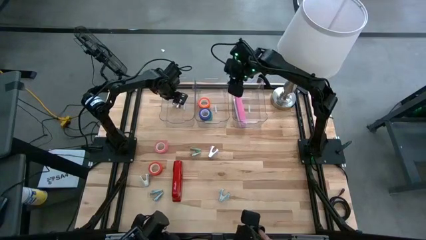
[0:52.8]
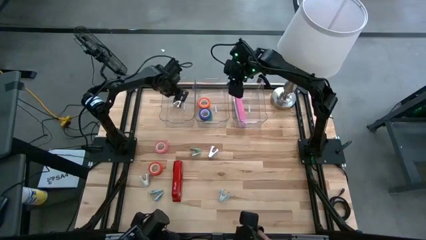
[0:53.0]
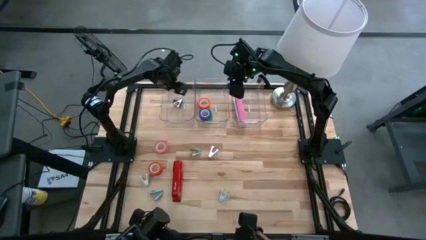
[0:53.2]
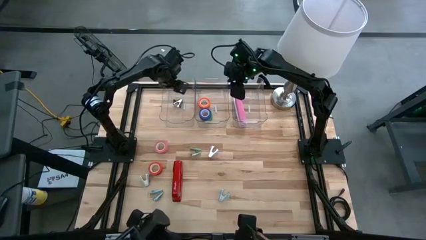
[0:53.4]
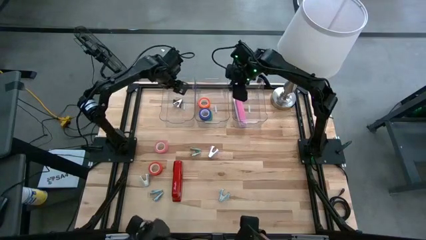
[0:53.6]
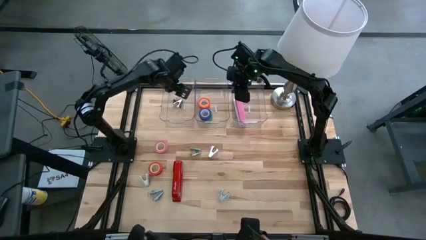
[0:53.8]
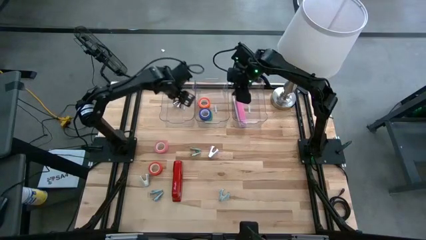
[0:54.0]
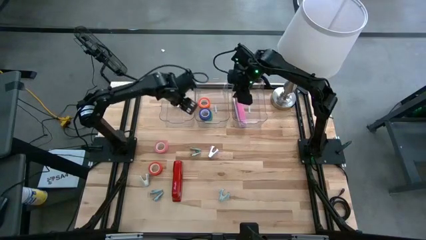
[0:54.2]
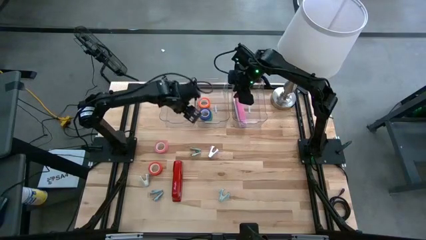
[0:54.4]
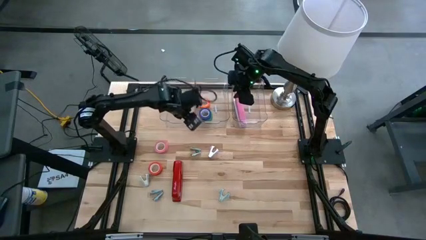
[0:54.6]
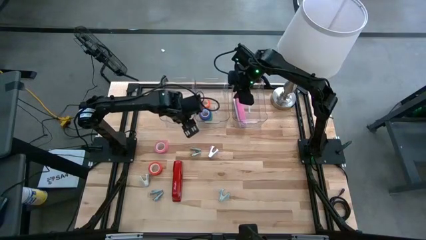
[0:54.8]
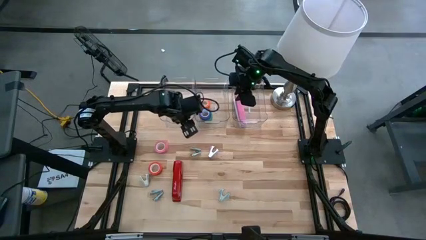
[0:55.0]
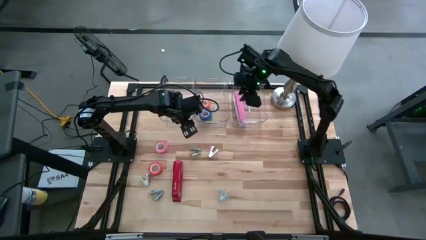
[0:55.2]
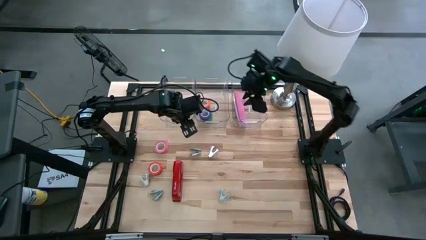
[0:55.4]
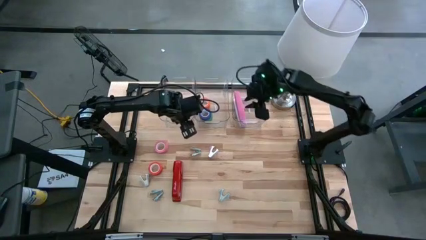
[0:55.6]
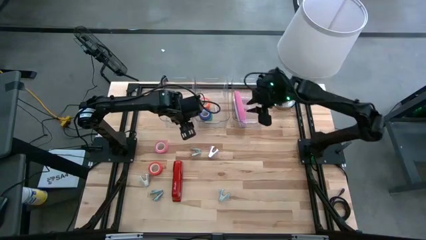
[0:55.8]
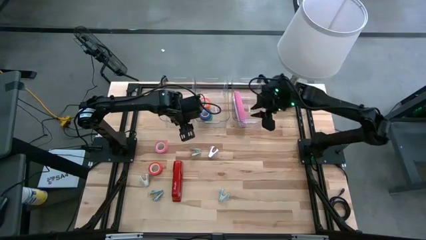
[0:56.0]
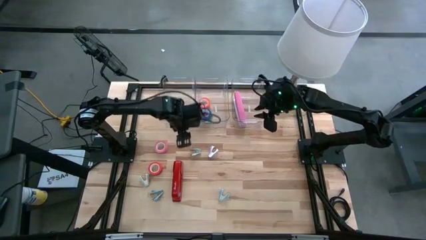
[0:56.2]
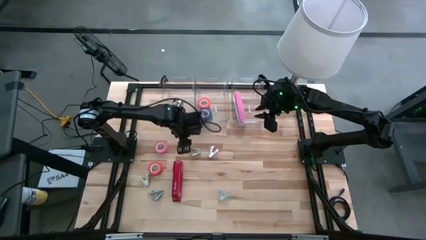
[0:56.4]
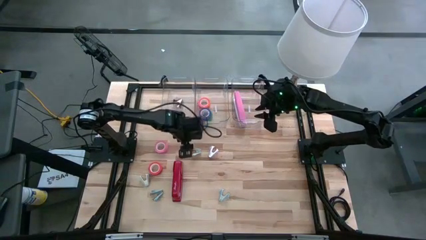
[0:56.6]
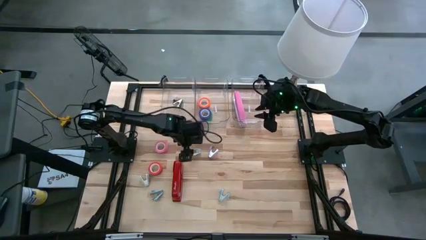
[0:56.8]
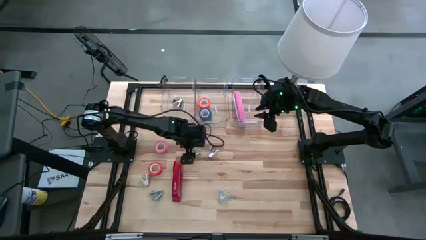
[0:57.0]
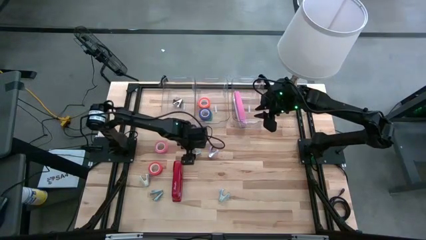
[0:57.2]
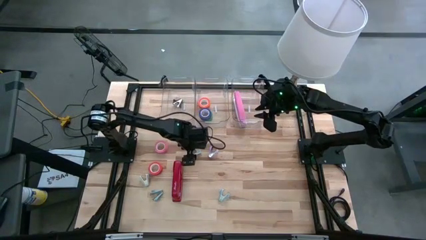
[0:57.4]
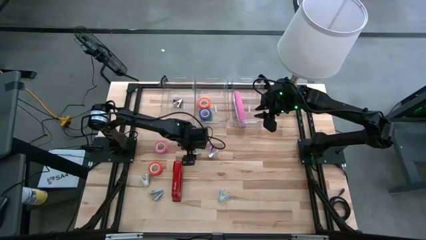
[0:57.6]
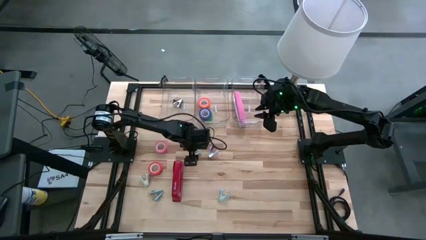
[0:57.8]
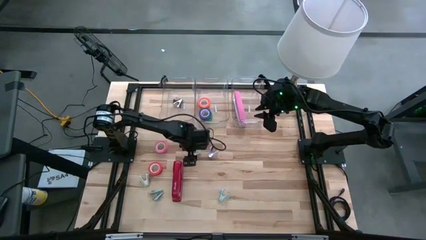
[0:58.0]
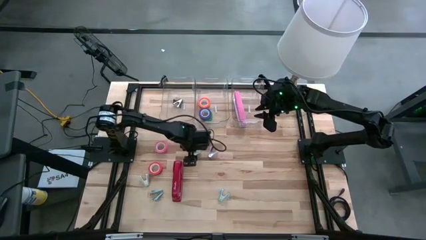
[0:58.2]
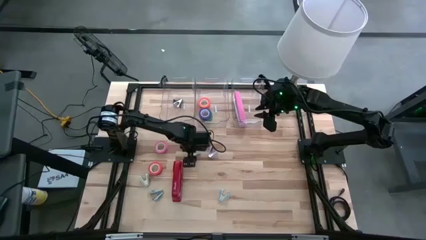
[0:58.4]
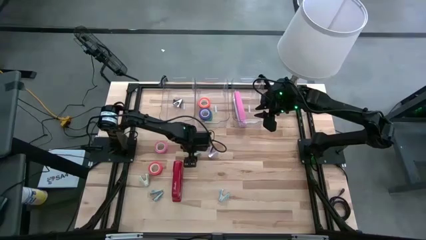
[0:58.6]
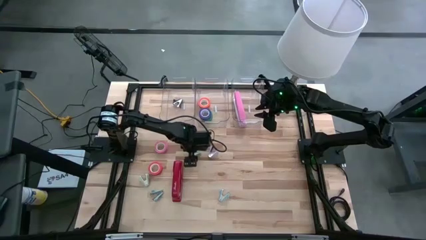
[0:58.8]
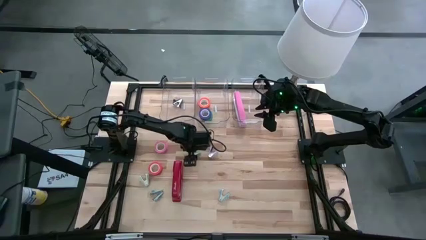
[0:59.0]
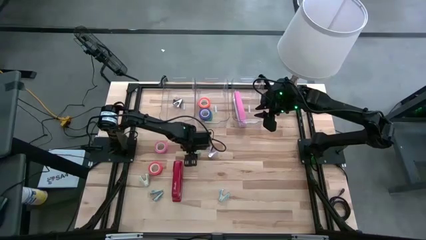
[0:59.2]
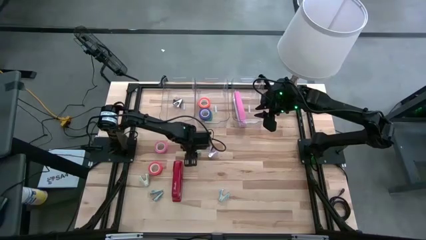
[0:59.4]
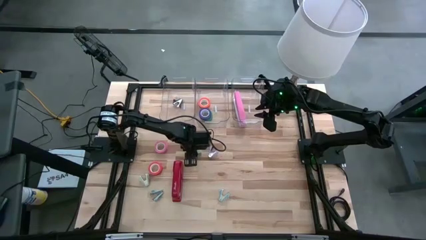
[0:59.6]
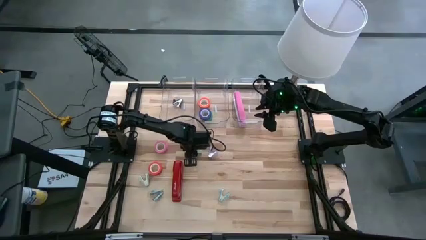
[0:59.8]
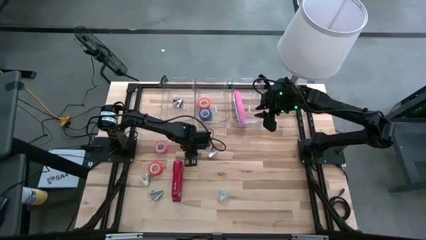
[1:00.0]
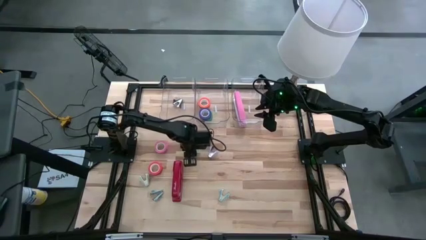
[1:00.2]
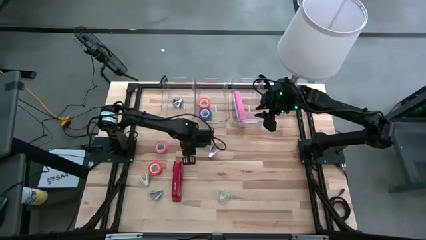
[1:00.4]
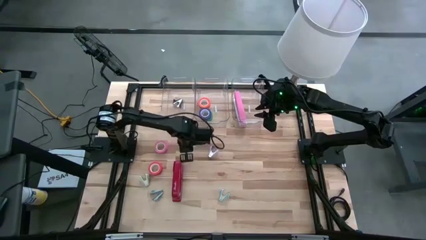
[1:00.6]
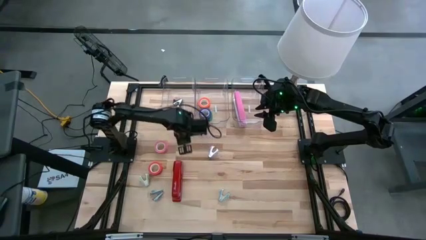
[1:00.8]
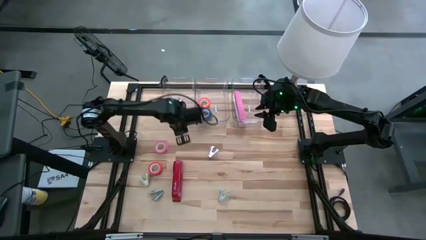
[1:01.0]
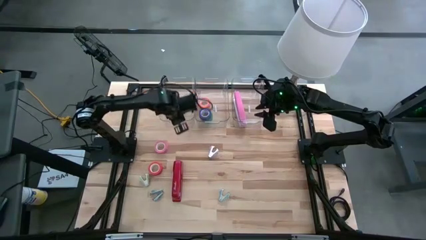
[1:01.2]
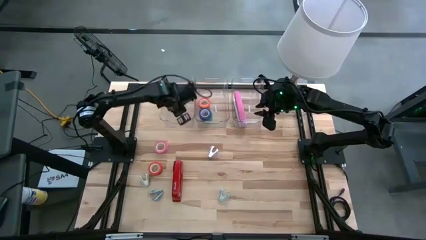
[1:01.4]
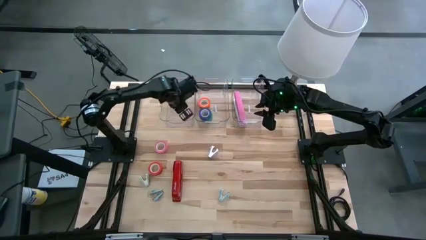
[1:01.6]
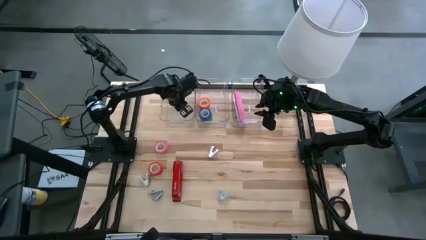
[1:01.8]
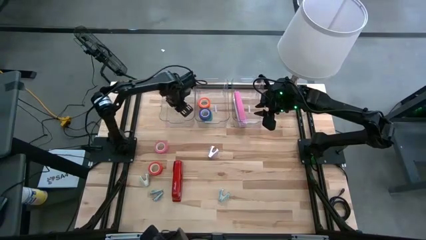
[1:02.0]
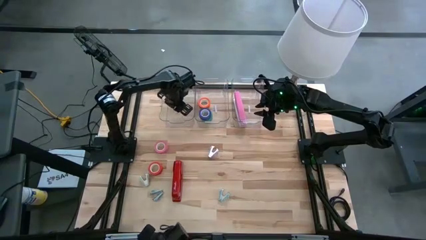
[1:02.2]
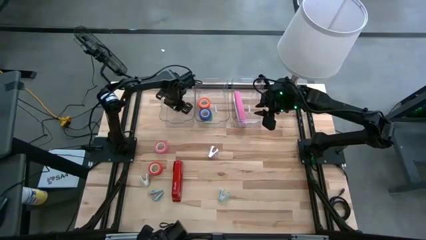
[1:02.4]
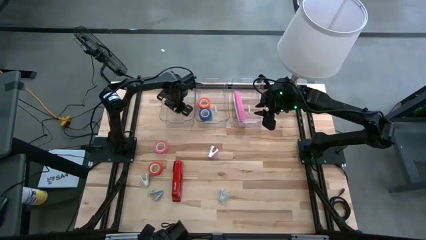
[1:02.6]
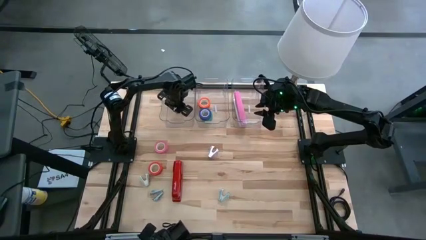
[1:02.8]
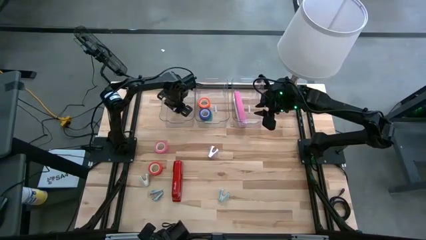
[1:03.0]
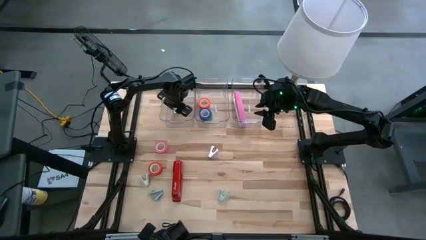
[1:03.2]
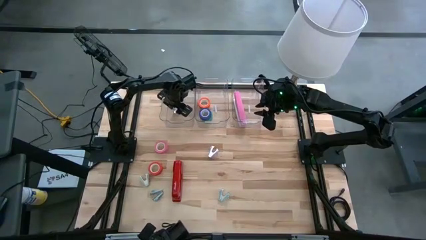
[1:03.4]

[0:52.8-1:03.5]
Task: Pick and place Stapler, Stapler remover, tape
Put the top gray staple remover into the left transparent bin
